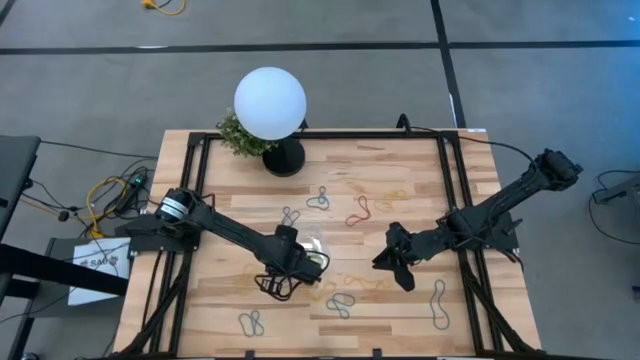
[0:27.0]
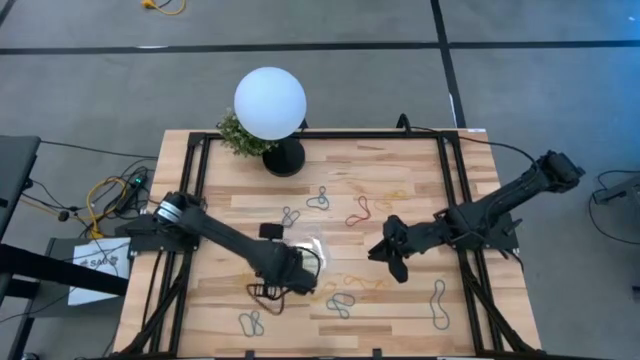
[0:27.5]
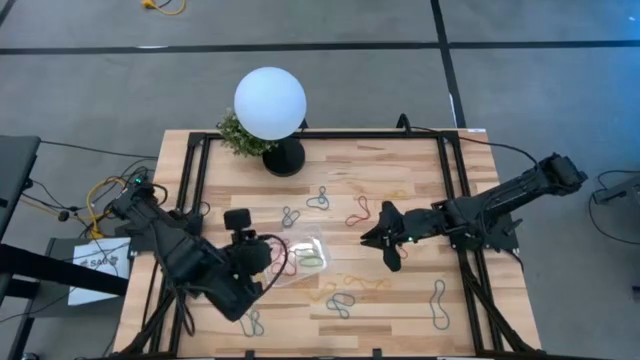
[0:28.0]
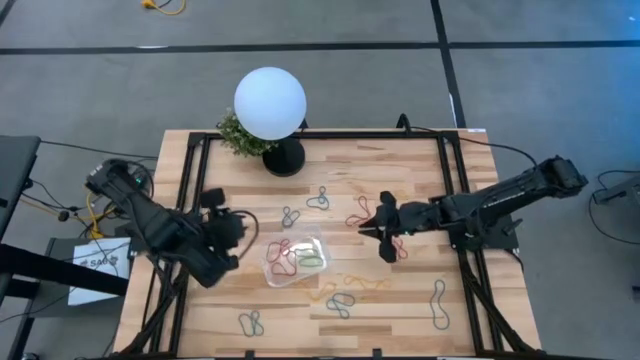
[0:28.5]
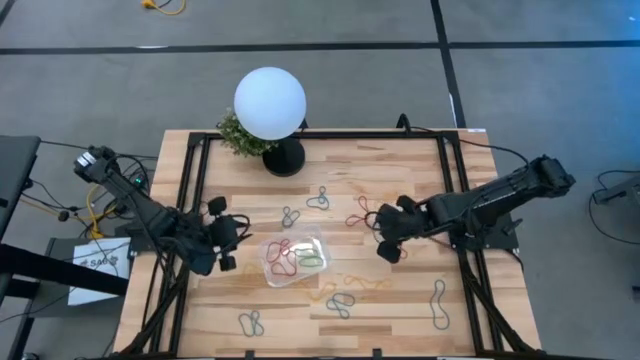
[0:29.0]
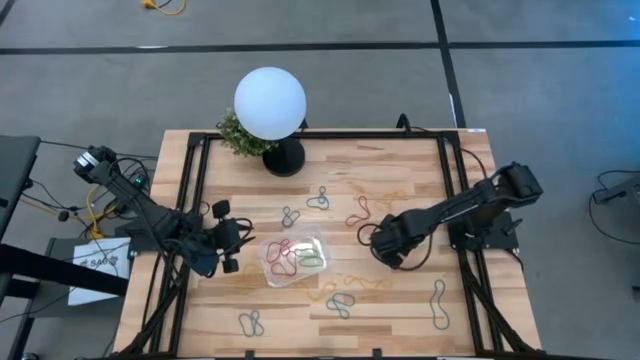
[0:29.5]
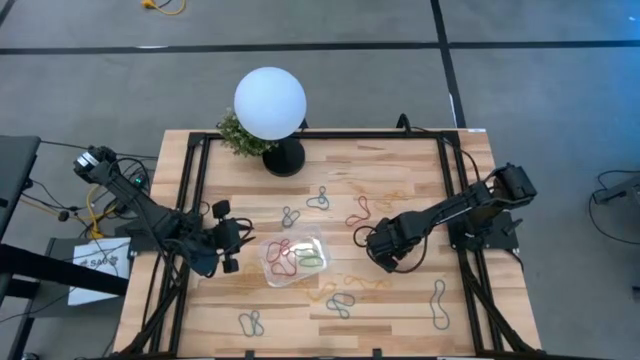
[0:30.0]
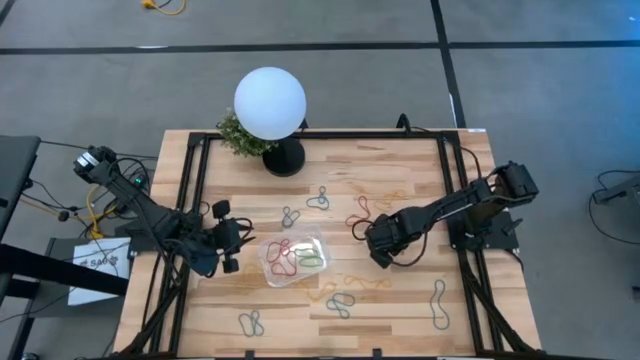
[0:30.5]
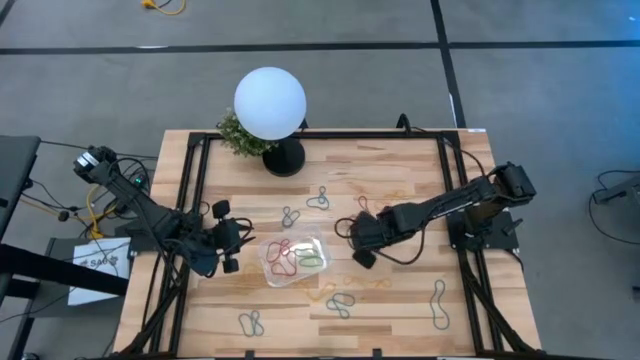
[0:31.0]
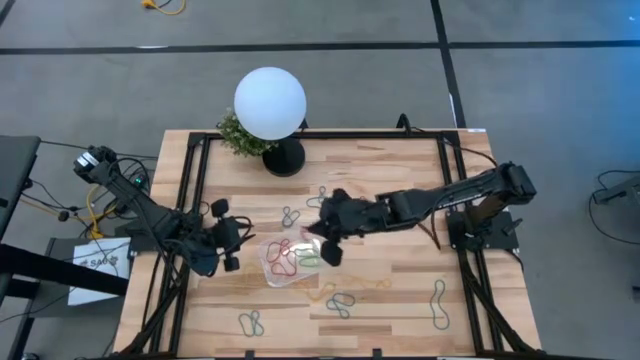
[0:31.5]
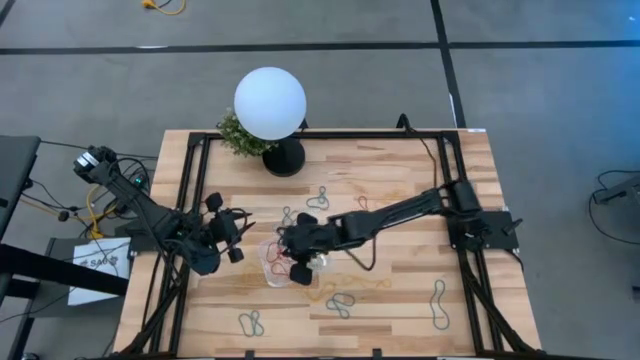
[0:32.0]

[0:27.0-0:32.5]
Task: Pick and place items into bin
Put the red rubber band into the transparent bin

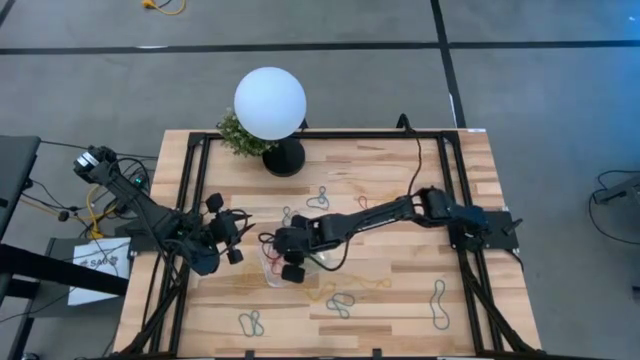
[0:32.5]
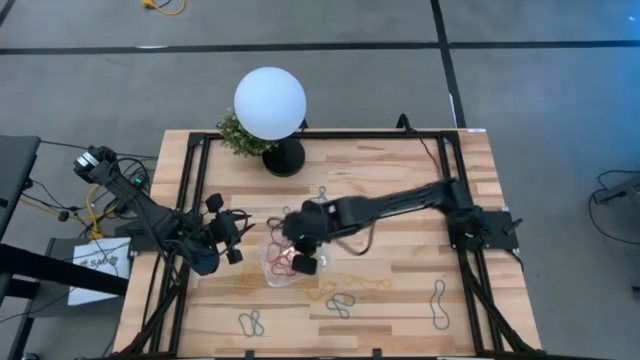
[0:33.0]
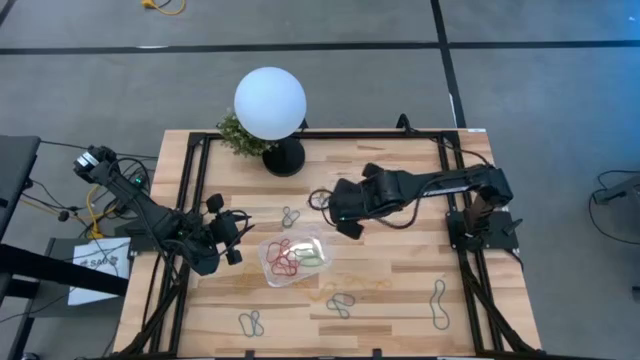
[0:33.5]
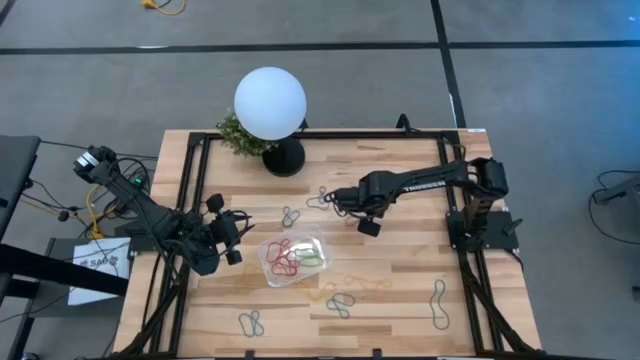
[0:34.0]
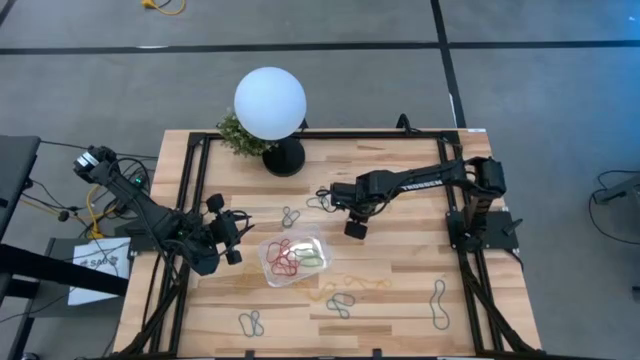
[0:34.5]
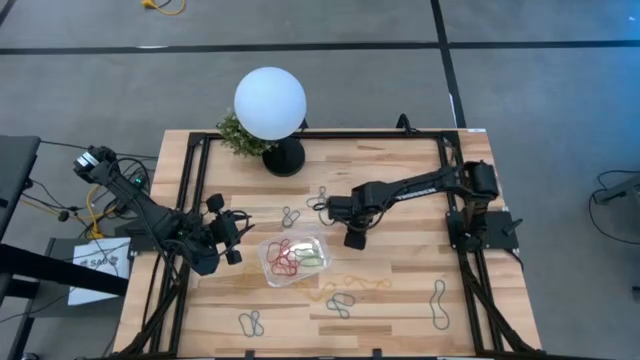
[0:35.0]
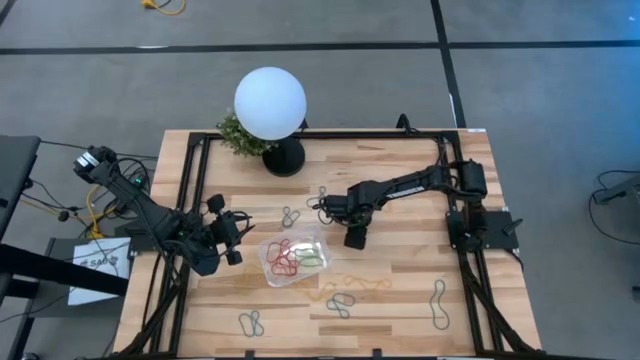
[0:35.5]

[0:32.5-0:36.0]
Put the red rubber band into the transparent bin

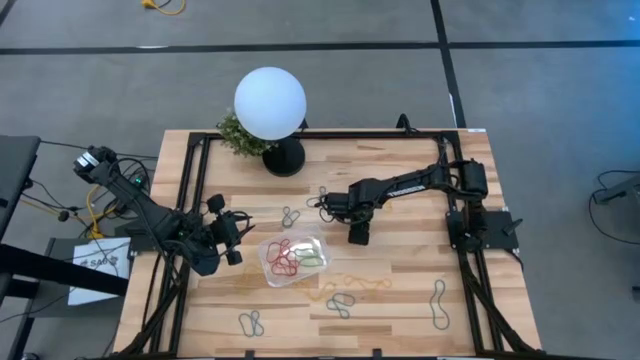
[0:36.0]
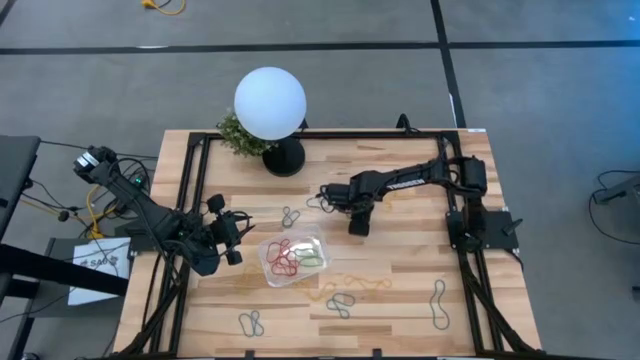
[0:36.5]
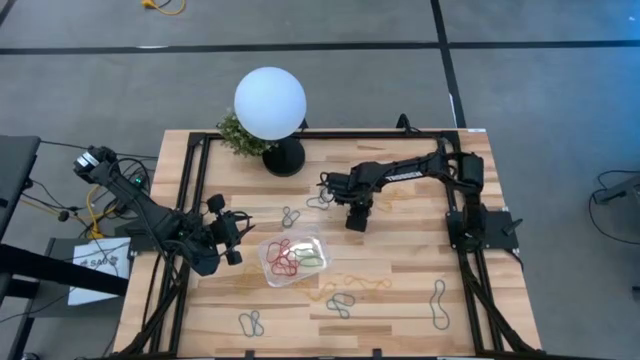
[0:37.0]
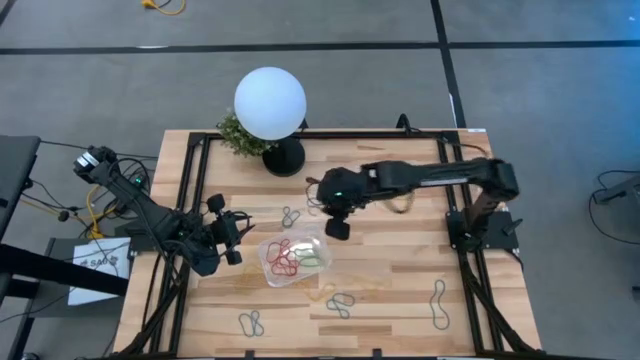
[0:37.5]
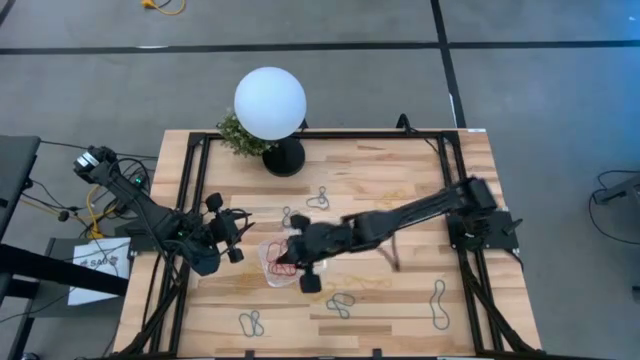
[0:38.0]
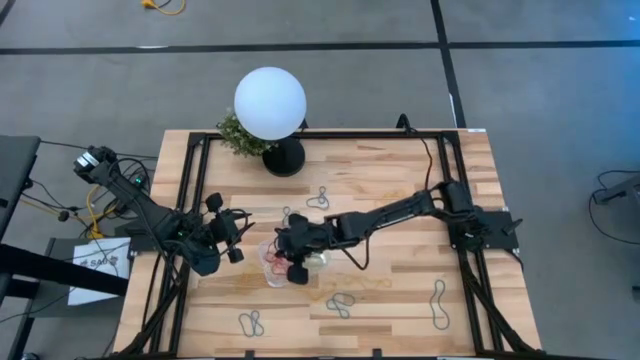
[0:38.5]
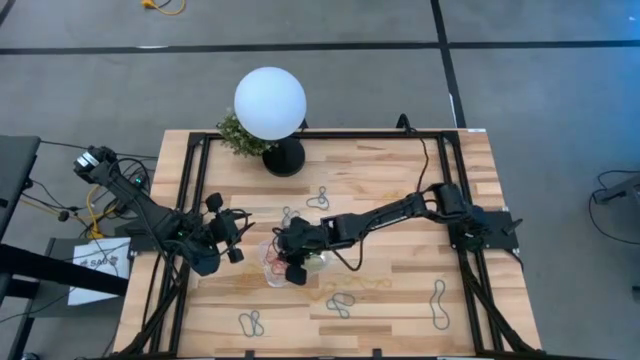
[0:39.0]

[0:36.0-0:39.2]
Put the red rubber band into the transparent bin

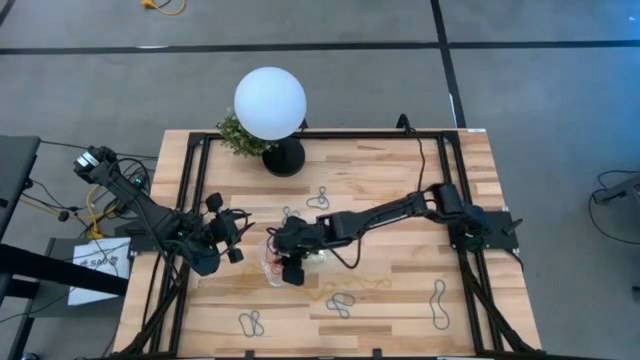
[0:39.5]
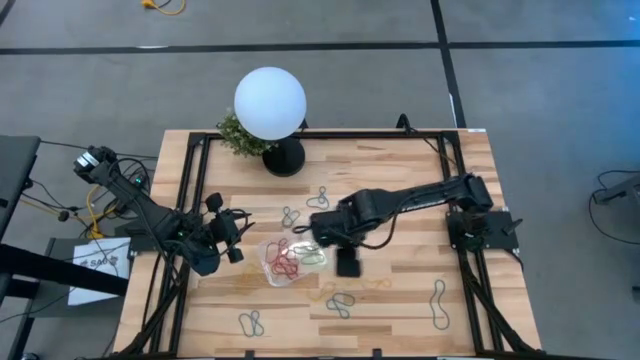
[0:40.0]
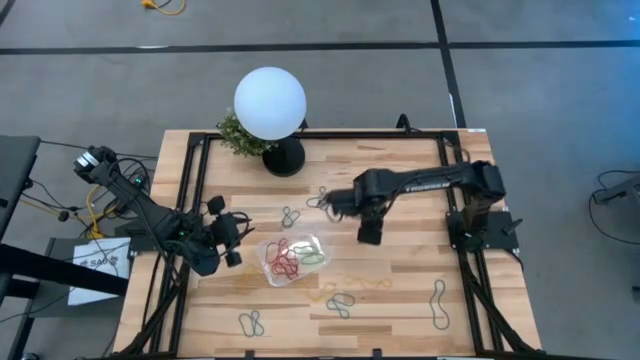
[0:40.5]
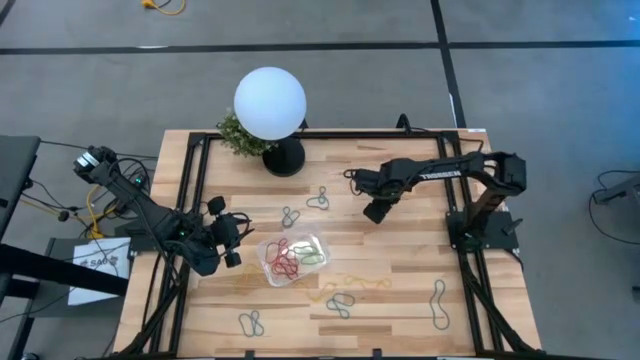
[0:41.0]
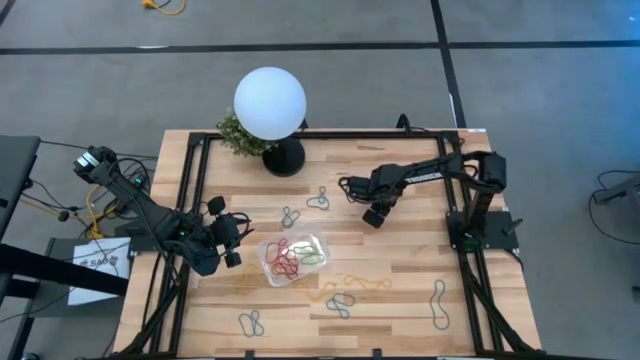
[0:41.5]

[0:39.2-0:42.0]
Put the yellow rubber band into the transparent bin

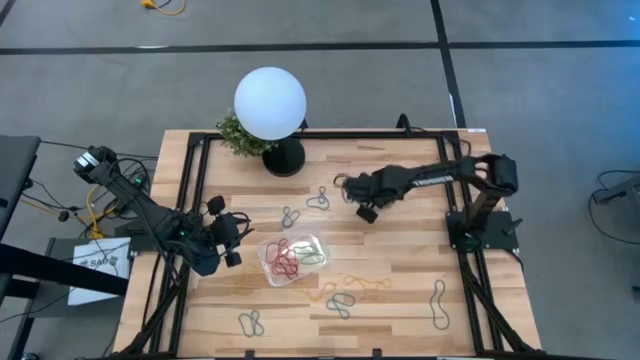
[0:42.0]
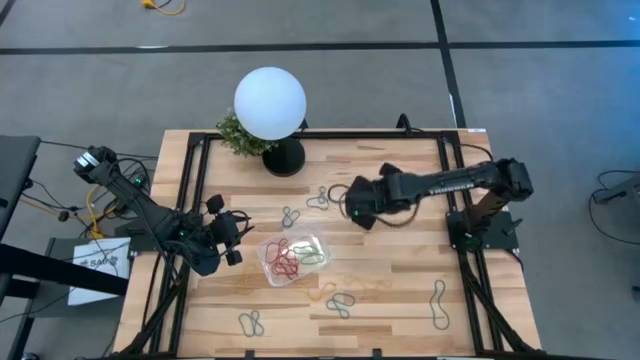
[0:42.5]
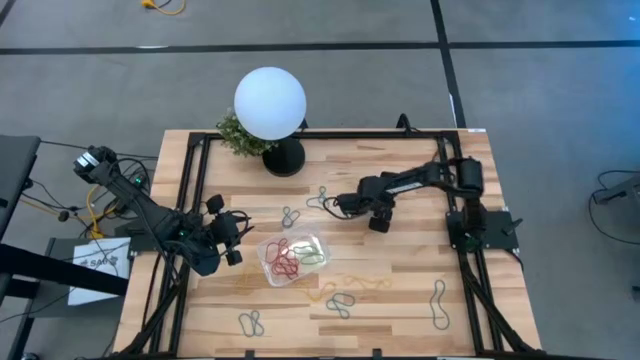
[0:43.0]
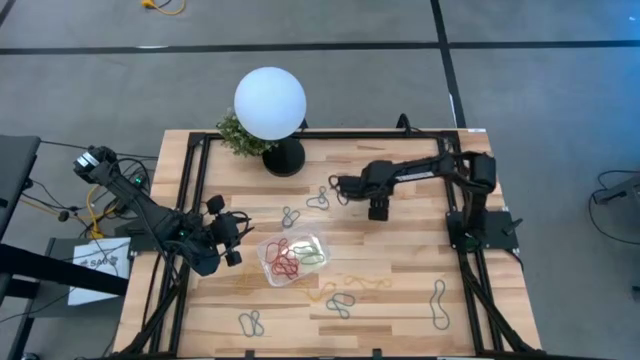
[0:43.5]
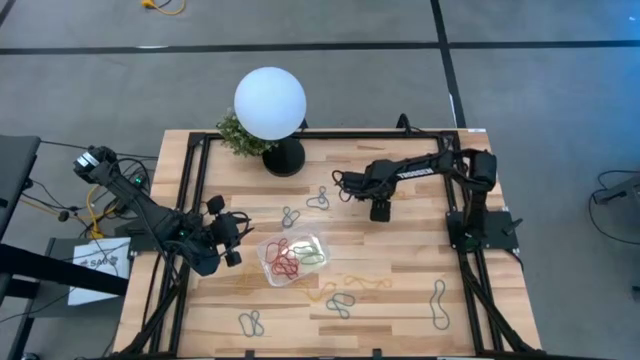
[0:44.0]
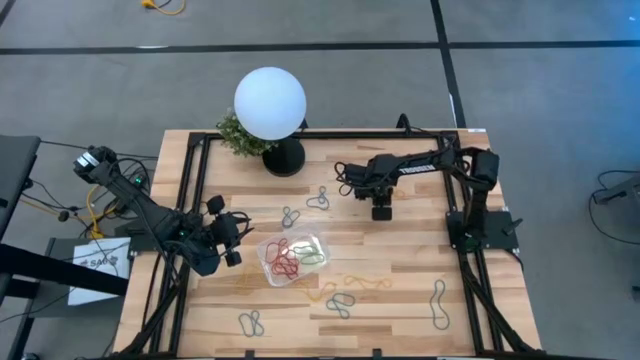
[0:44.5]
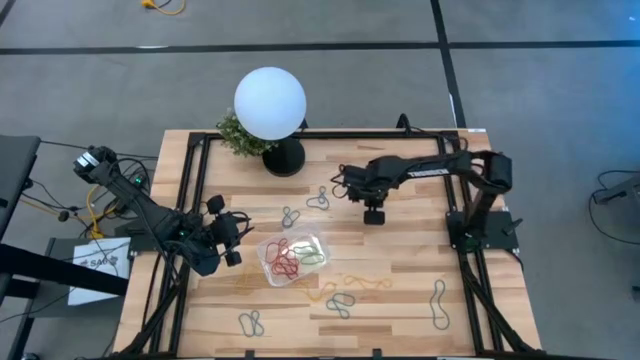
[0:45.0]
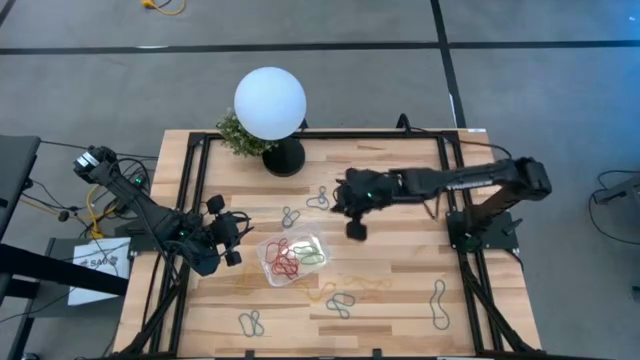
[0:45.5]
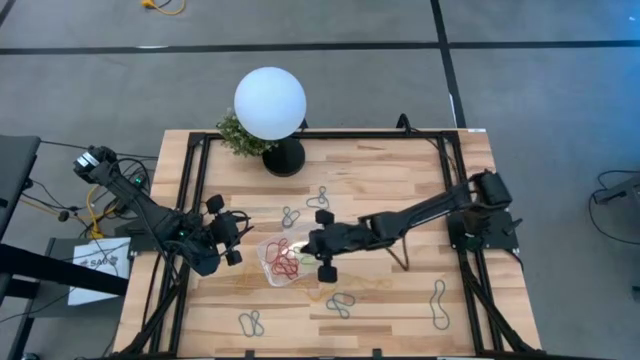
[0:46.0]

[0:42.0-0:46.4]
Put the yellow rubber band into the transparent bin

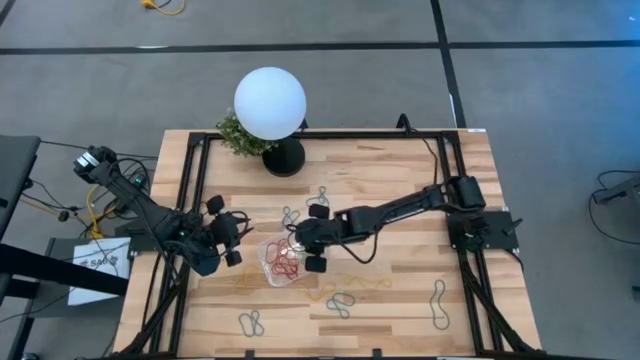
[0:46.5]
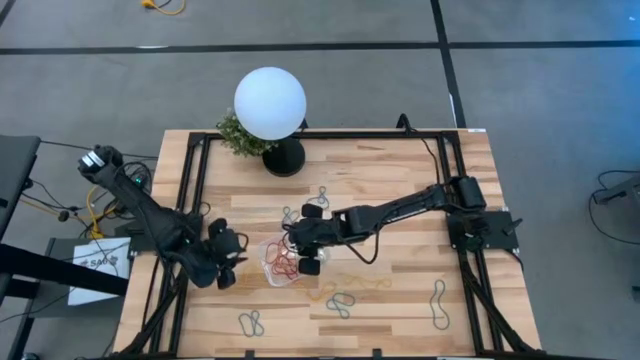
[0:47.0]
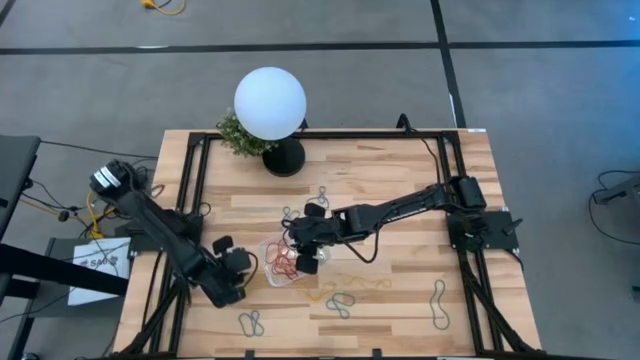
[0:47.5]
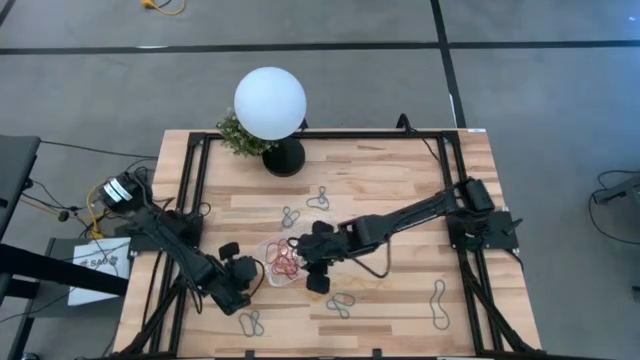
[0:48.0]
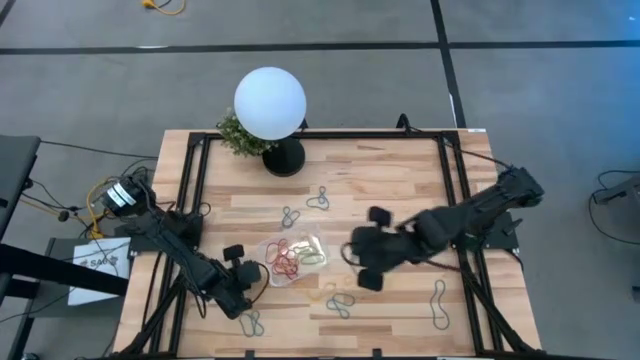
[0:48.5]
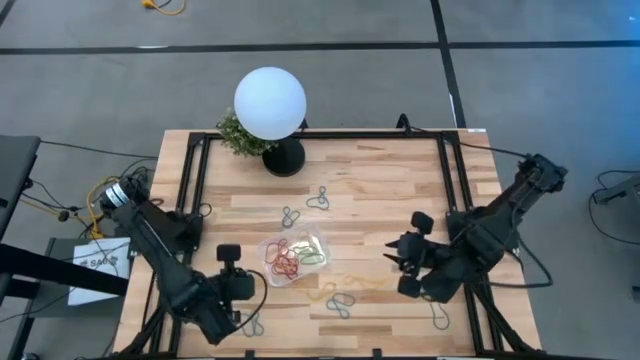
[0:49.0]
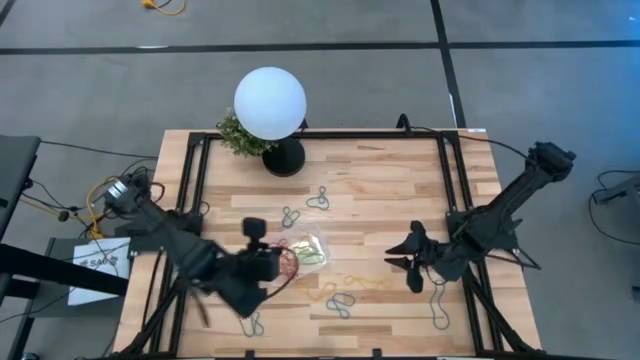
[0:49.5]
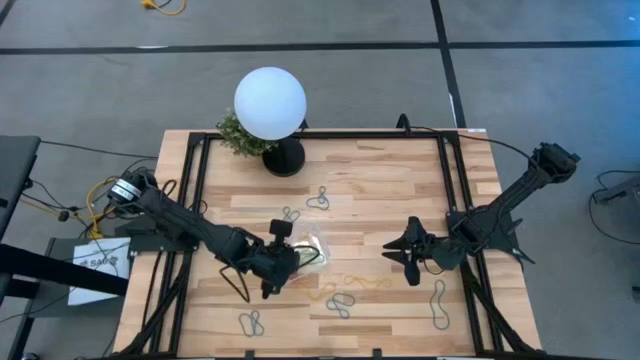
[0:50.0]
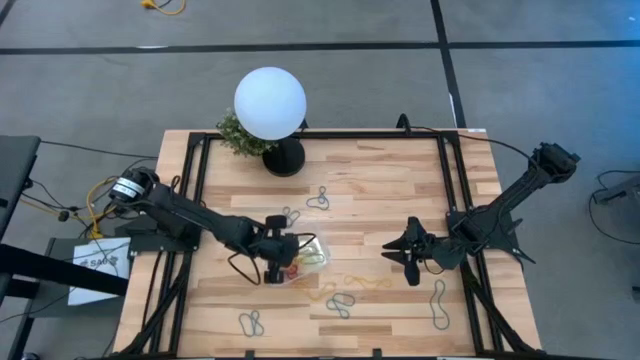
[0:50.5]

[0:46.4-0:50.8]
Put the yellow rubber band into the transparent bin
